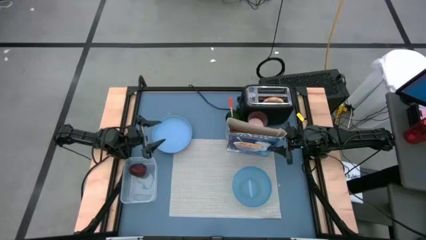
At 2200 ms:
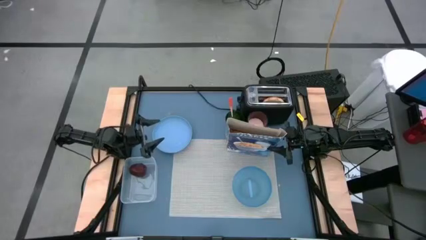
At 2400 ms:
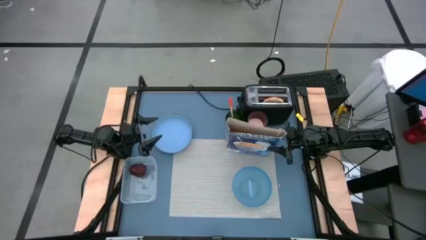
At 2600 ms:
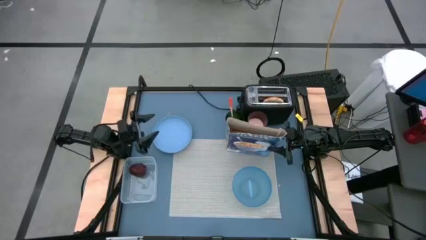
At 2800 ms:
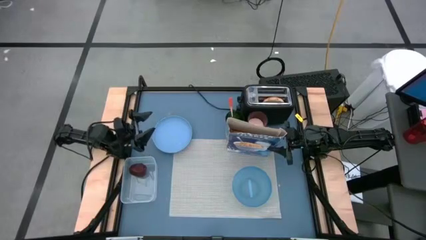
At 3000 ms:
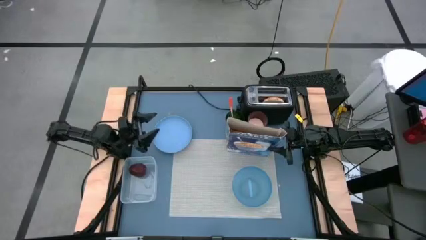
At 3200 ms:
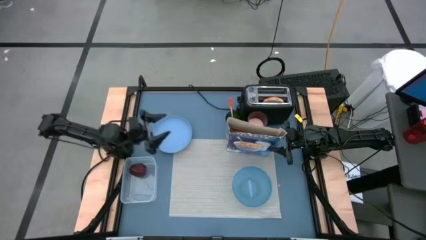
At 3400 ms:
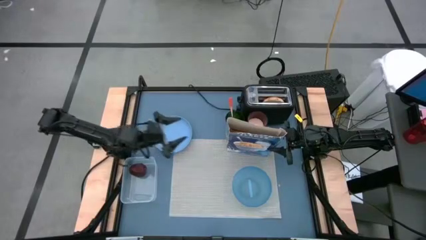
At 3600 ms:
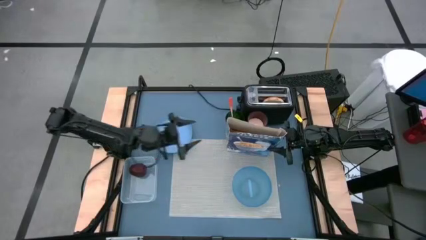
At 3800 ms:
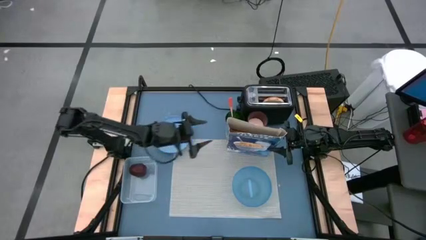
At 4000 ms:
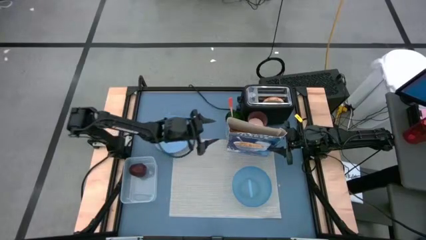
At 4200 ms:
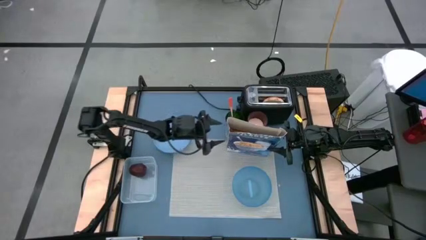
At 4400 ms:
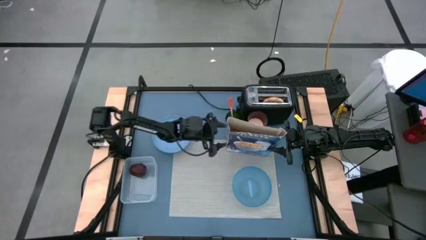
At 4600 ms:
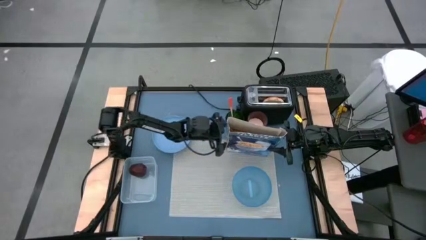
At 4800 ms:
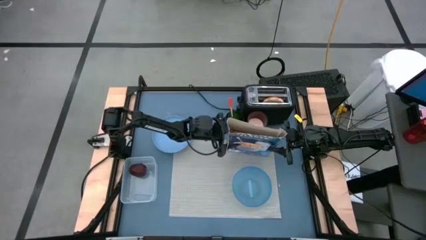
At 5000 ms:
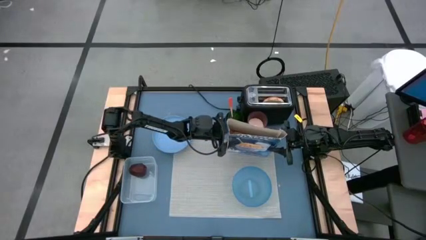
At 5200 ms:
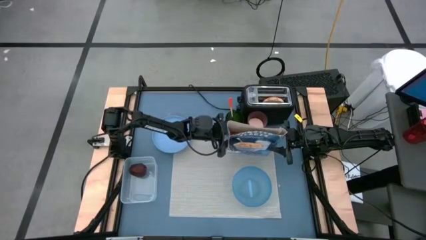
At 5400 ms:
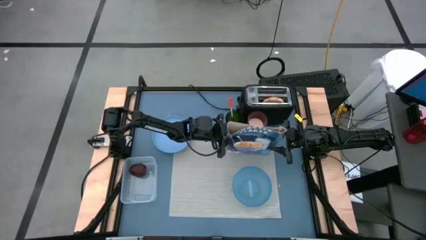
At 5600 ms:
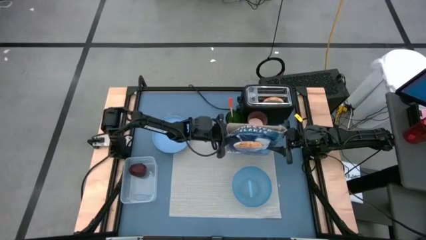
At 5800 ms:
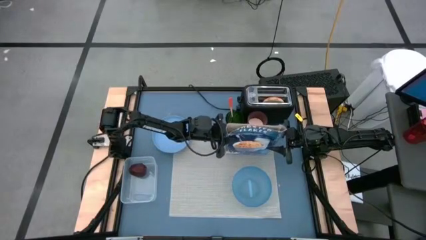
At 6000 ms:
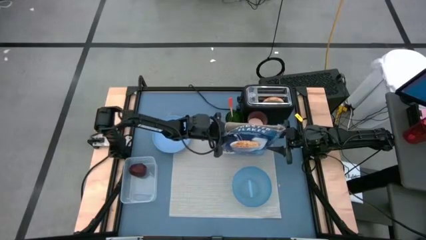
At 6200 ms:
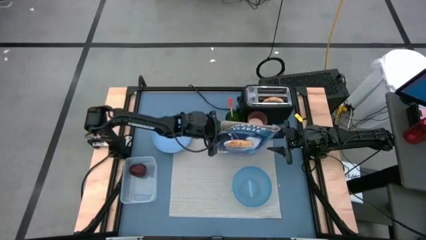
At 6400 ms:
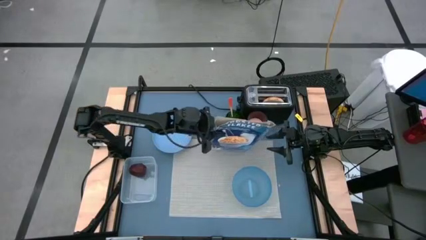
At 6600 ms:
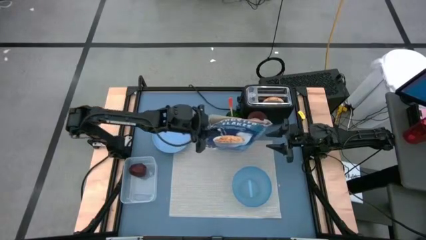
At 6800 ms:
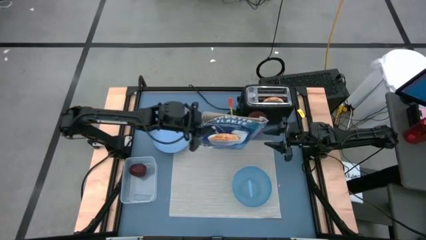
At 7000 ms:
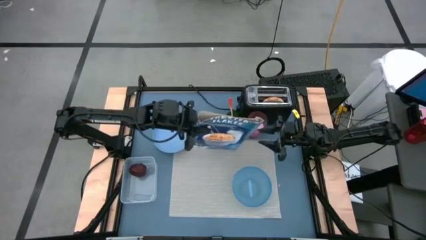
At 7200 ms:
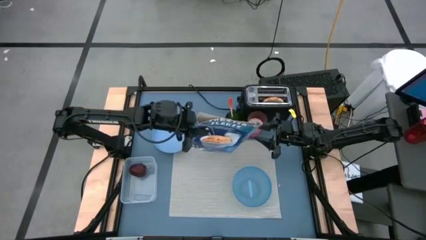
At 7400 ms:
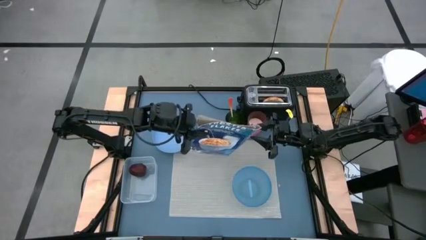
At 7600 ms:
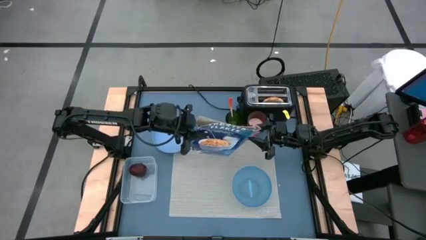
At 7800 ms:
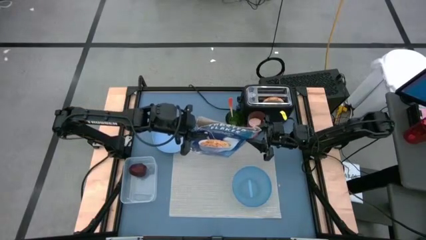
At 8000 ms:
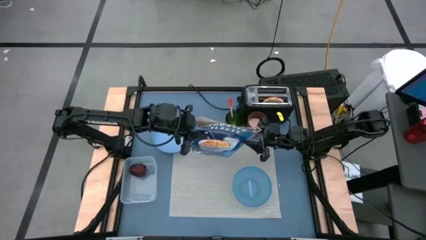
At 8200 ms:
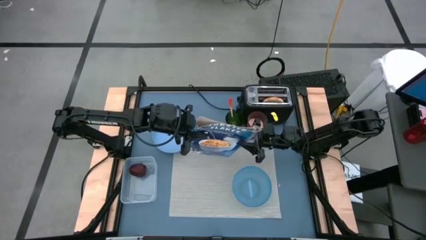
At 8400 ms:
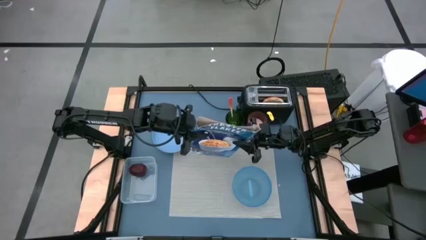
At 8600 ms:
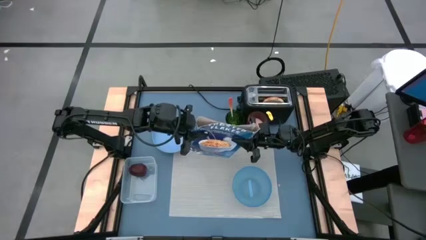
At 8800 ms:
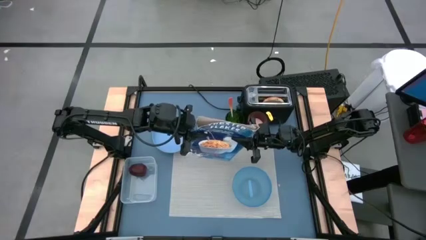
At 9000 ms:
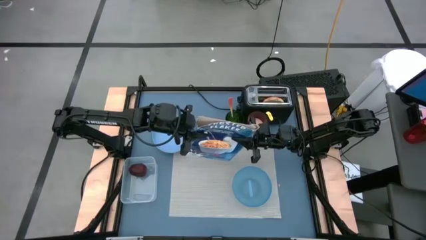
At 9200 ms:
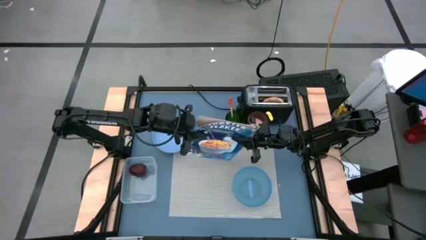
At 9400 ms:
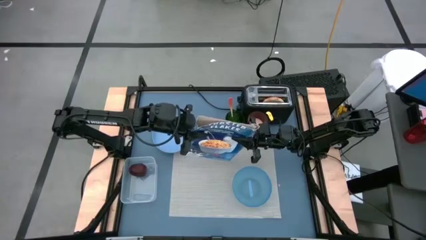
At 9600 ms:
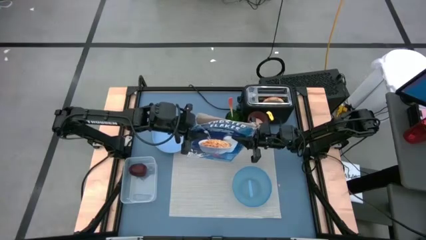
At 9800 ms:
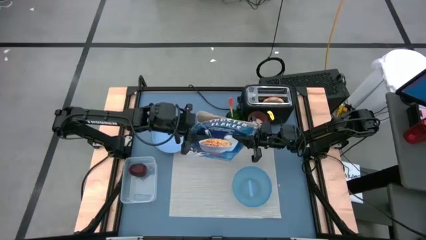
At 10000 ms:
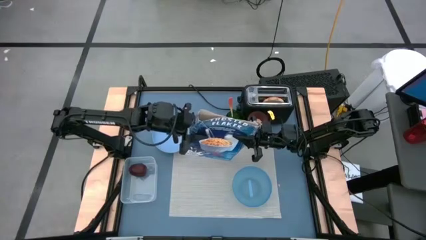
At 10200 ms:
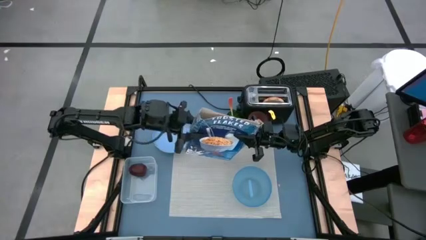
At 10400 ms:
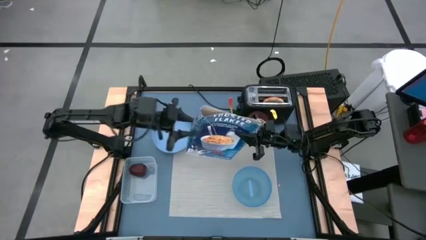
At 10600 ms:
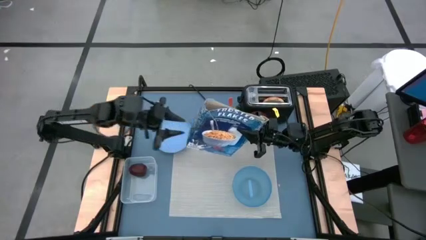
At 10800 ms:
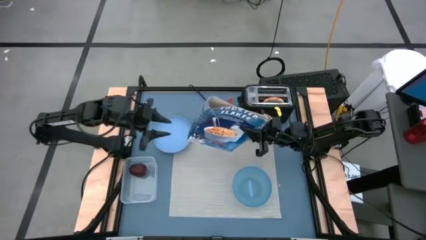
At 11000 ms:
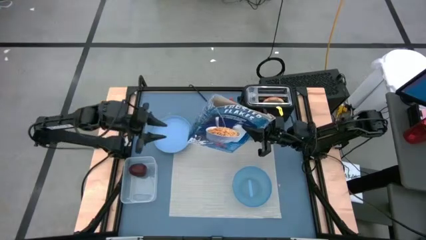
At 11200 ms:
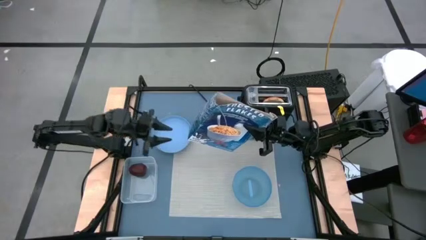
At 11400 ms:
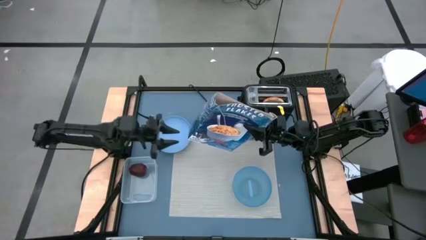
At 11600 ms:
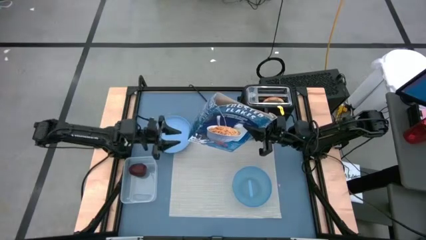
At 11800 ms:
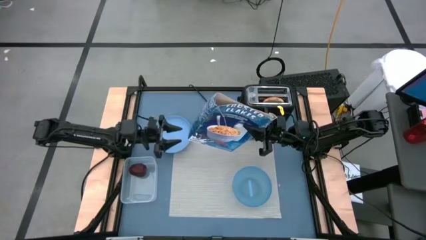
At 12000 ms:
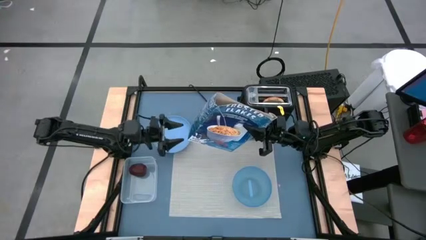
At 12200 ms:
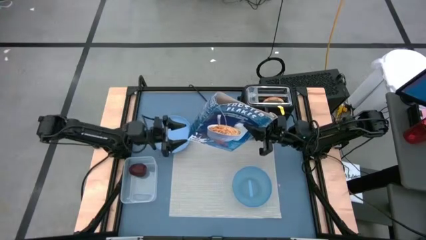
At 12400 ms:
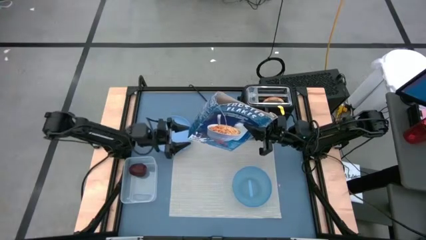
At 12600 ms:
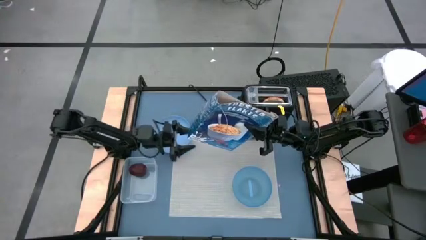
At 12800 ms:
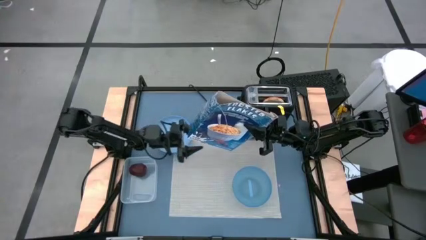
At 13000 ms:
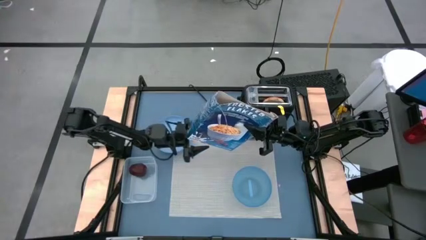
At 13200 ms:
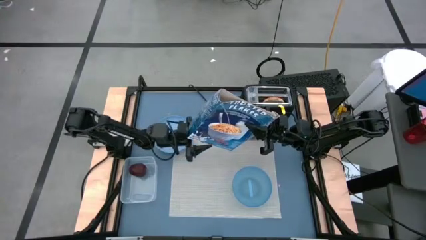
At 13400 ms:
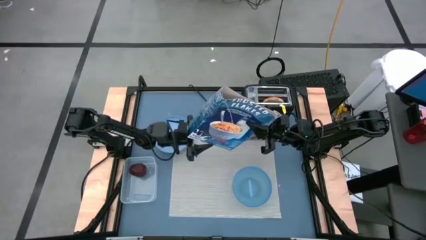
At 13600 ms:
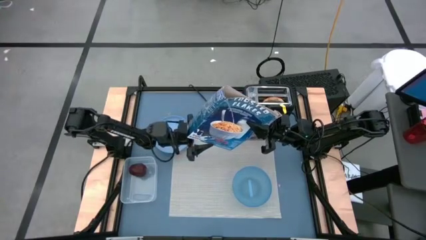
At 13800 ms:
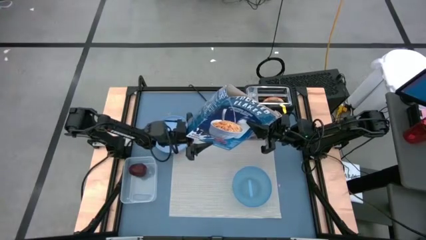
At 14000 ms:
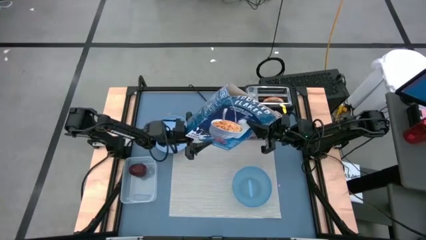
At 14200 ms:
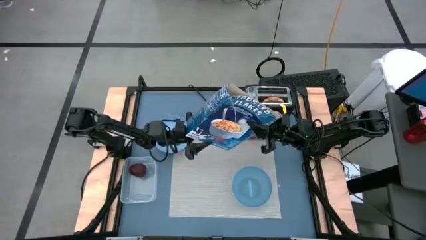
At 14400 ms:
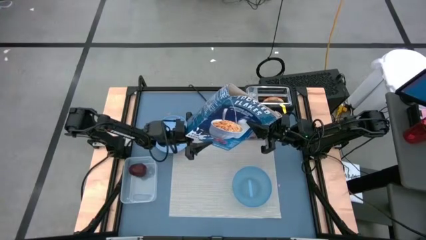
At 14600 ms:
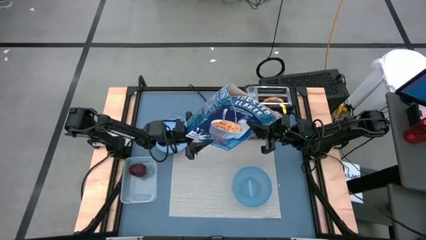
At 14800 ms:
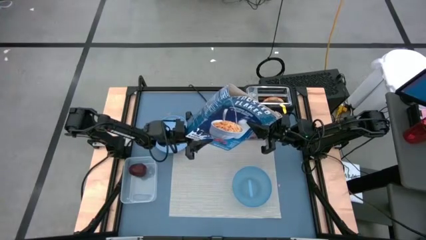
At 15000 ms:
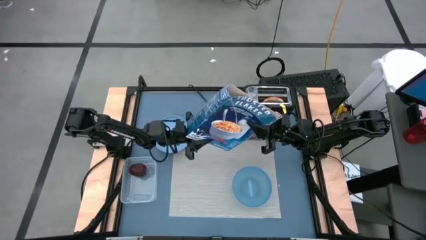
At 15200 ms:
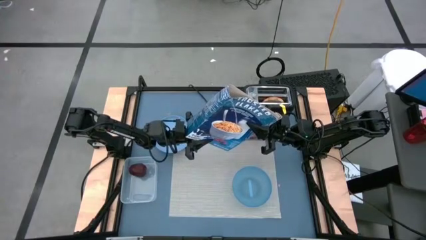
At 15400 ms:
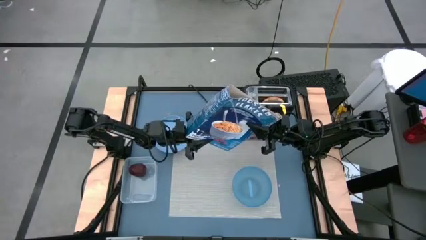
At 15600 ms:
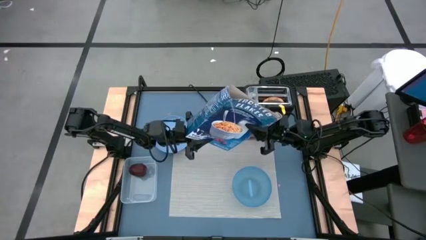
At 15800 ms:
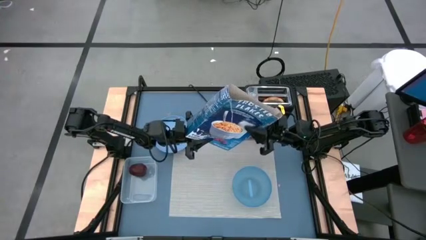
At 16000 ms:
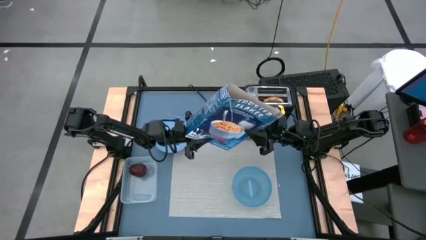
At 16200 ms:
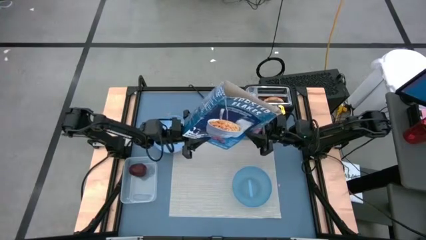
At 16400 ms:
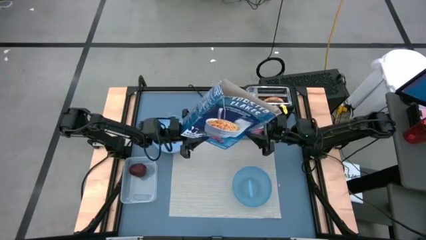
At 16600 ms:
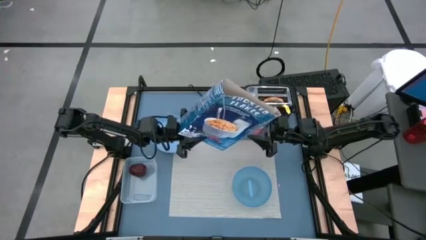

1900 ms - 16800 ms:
Task: Arrange a breakfast setting
Pour the cereal into the blue bowl
